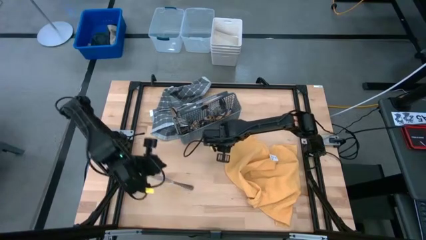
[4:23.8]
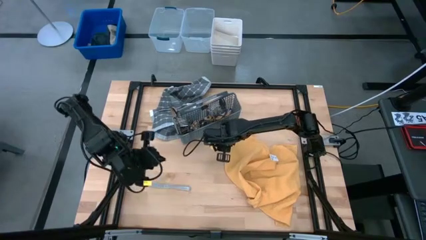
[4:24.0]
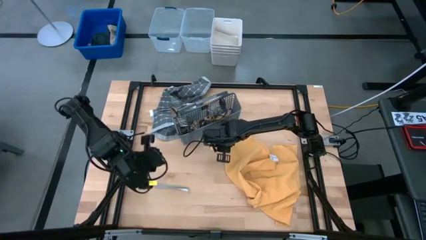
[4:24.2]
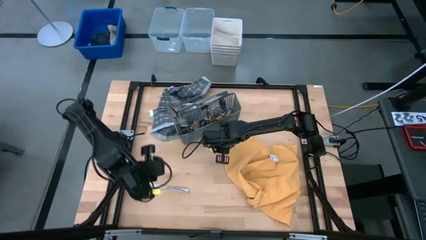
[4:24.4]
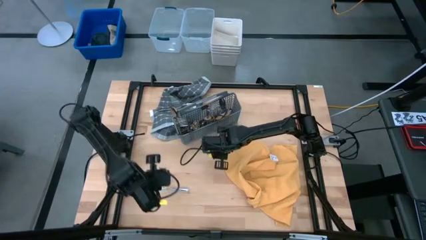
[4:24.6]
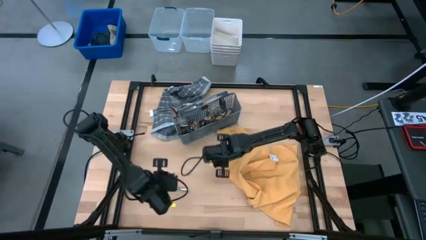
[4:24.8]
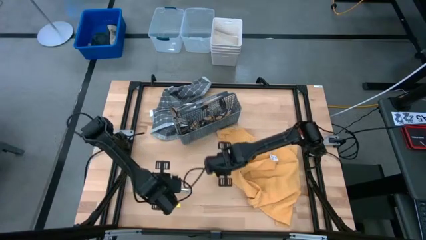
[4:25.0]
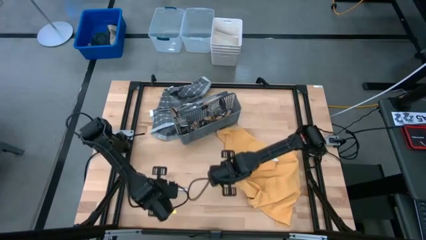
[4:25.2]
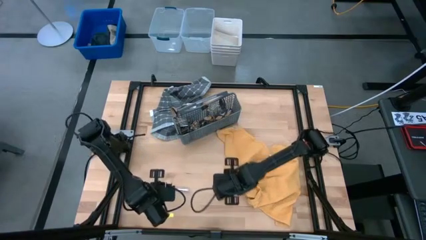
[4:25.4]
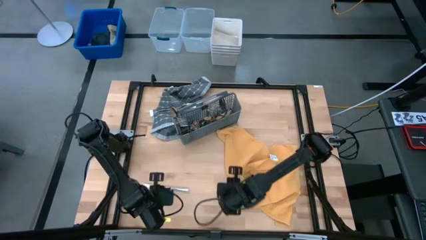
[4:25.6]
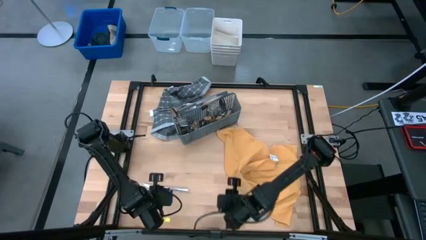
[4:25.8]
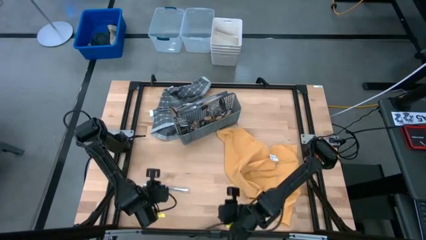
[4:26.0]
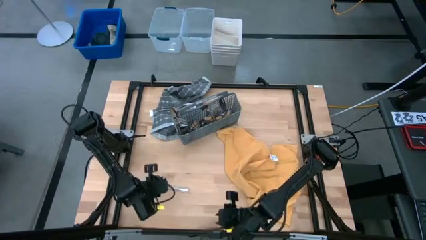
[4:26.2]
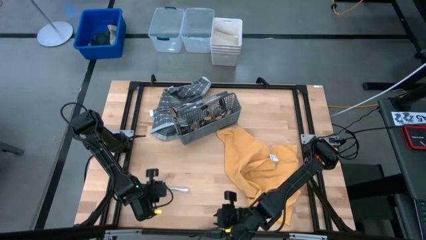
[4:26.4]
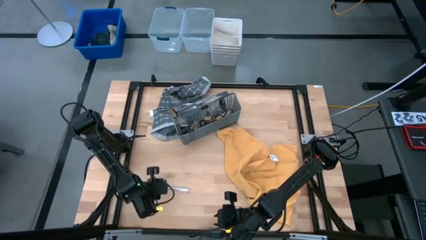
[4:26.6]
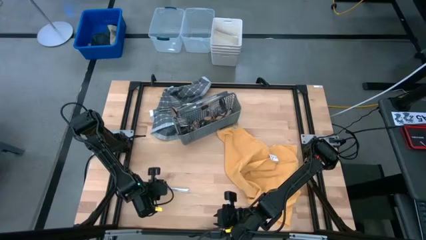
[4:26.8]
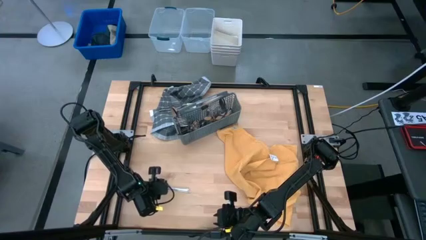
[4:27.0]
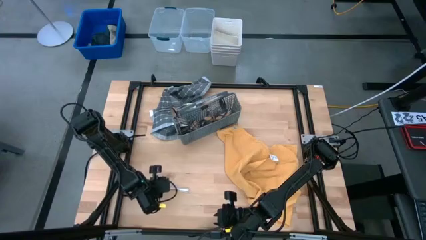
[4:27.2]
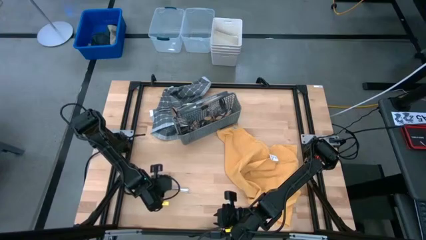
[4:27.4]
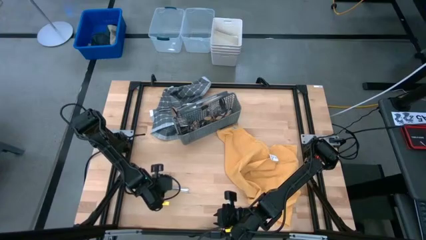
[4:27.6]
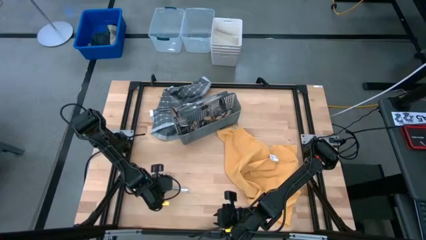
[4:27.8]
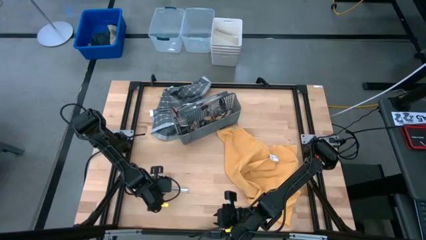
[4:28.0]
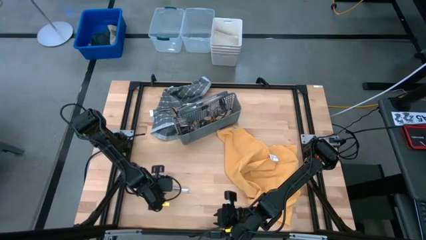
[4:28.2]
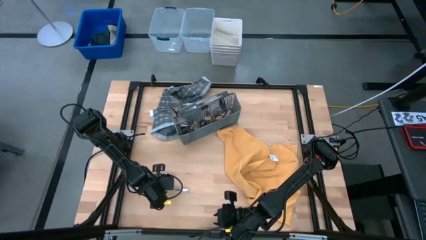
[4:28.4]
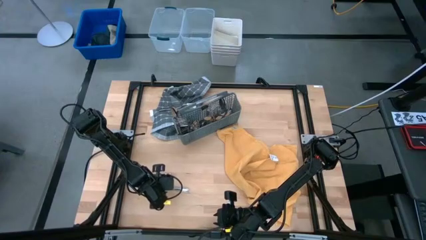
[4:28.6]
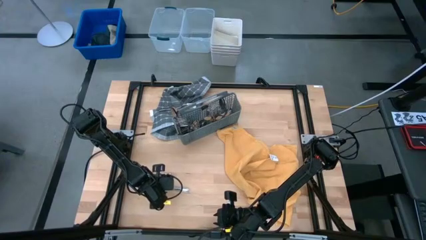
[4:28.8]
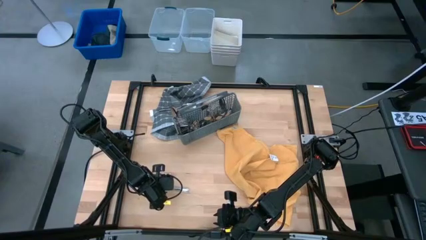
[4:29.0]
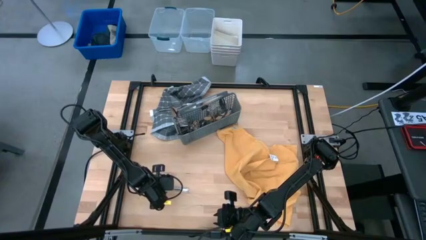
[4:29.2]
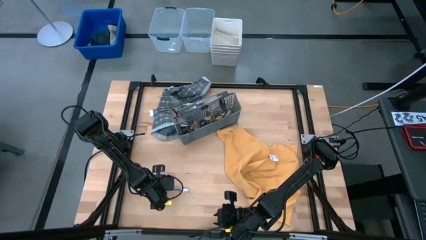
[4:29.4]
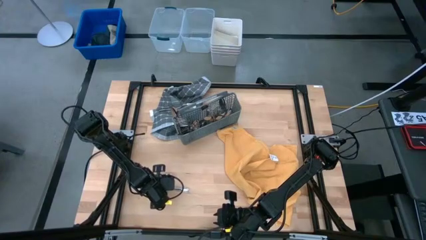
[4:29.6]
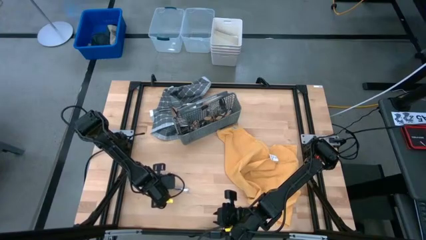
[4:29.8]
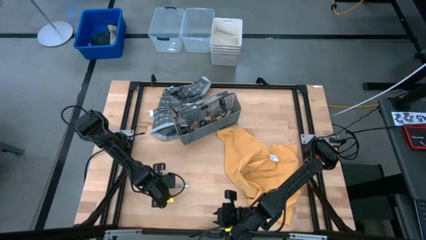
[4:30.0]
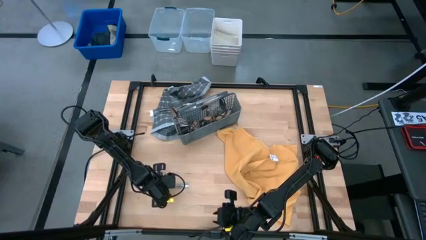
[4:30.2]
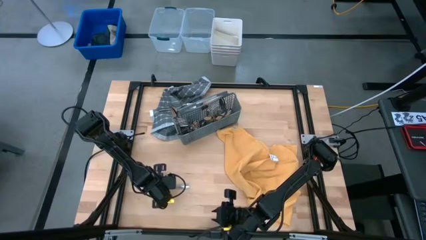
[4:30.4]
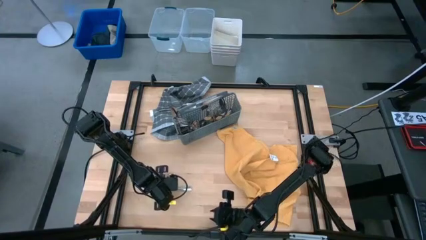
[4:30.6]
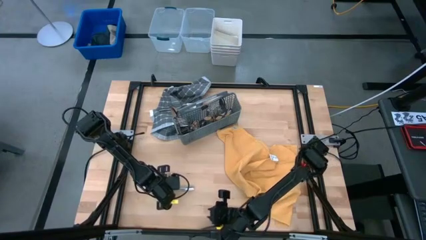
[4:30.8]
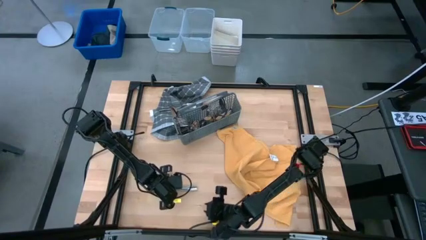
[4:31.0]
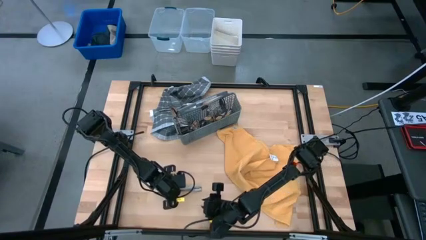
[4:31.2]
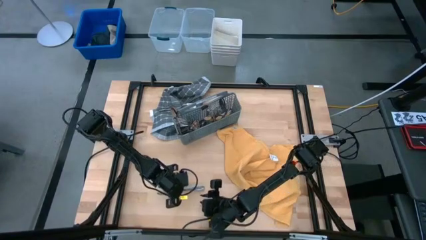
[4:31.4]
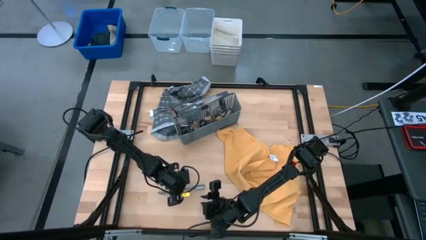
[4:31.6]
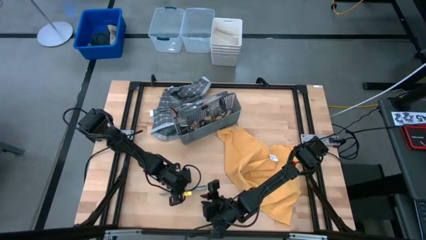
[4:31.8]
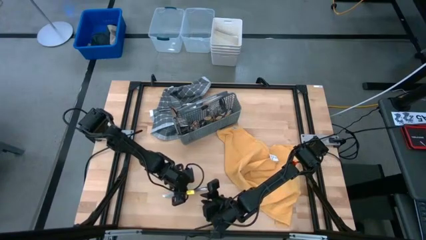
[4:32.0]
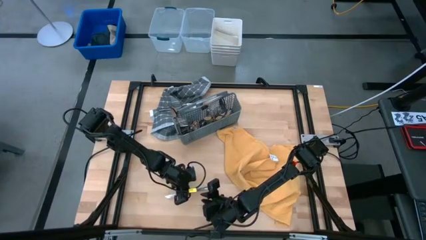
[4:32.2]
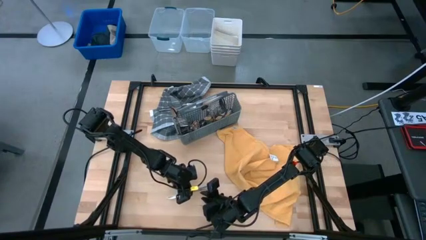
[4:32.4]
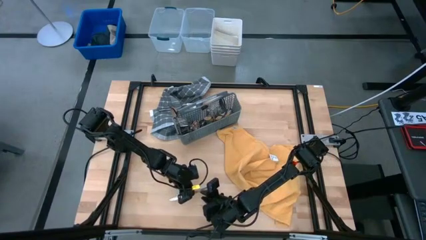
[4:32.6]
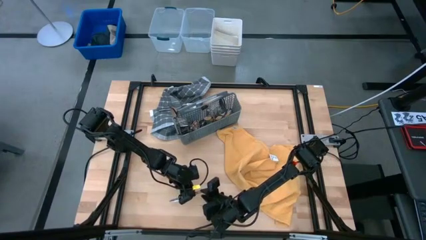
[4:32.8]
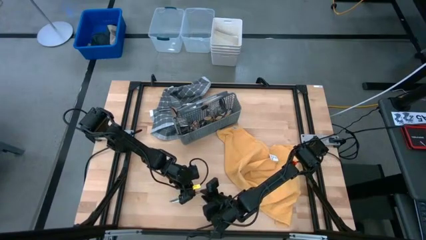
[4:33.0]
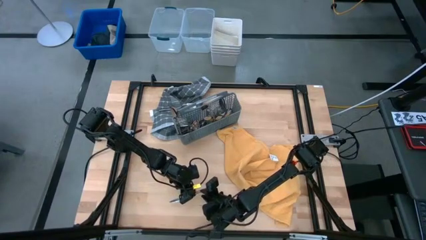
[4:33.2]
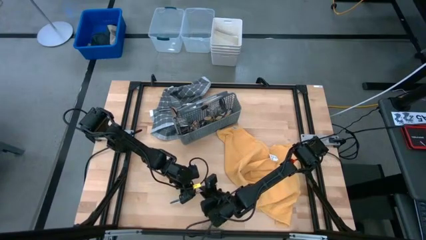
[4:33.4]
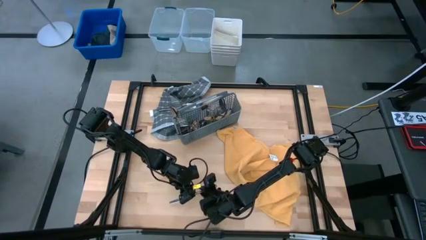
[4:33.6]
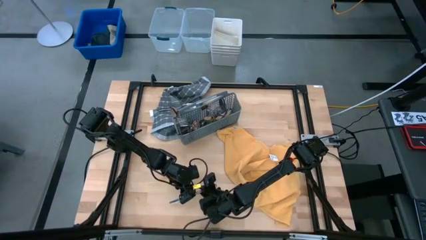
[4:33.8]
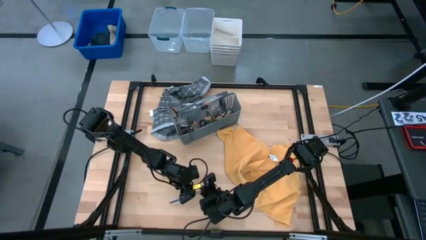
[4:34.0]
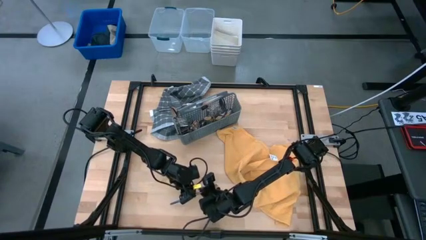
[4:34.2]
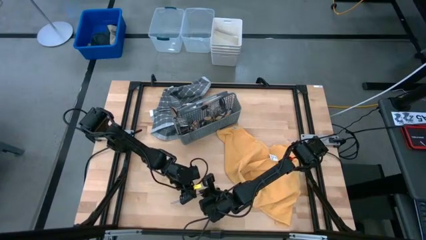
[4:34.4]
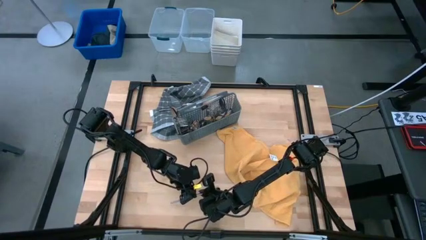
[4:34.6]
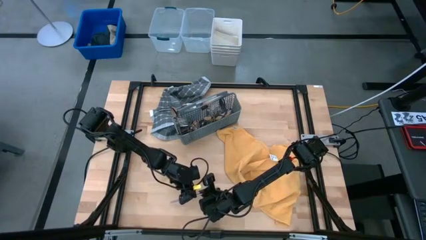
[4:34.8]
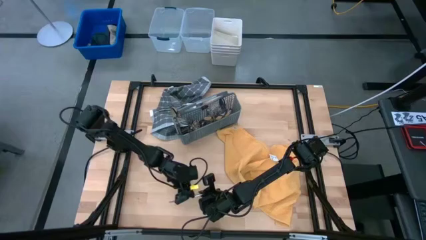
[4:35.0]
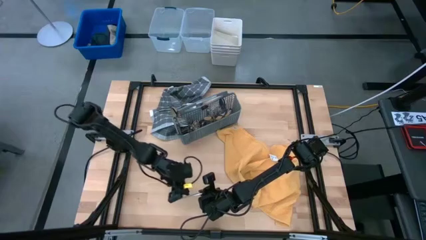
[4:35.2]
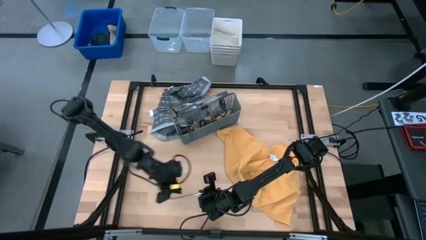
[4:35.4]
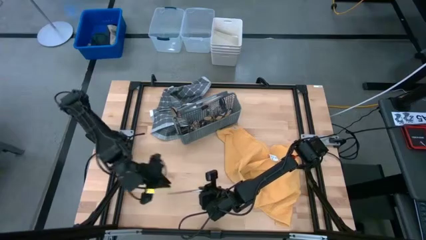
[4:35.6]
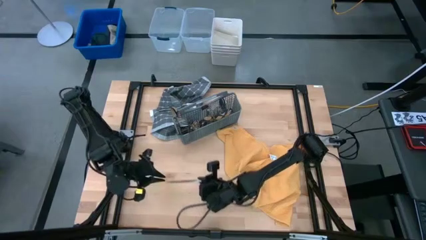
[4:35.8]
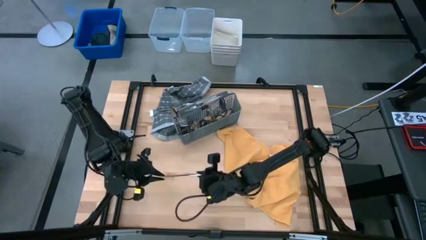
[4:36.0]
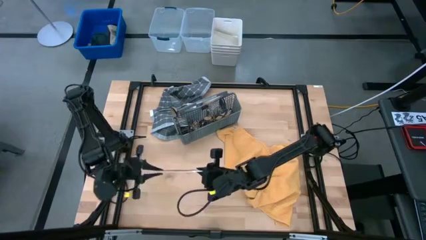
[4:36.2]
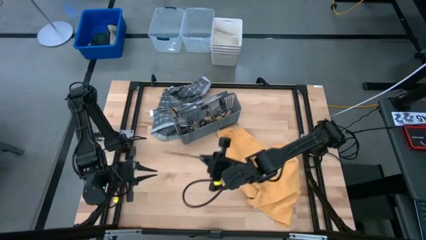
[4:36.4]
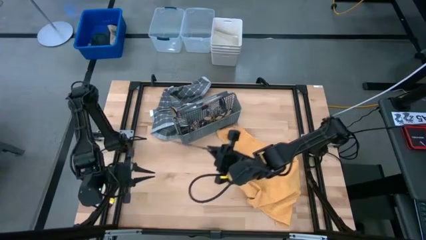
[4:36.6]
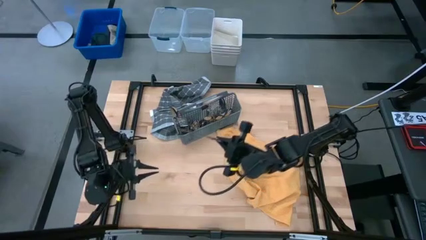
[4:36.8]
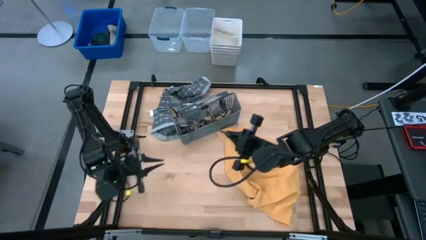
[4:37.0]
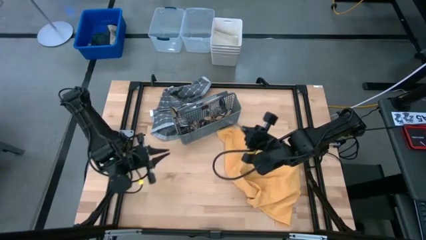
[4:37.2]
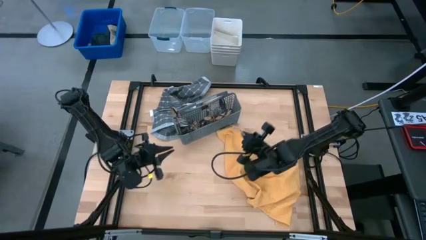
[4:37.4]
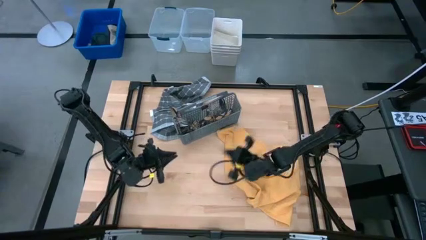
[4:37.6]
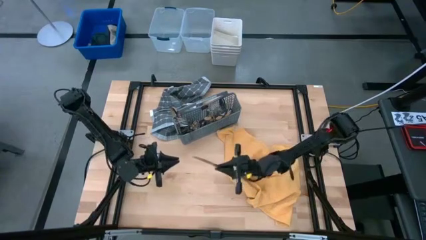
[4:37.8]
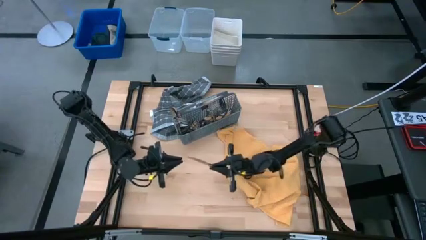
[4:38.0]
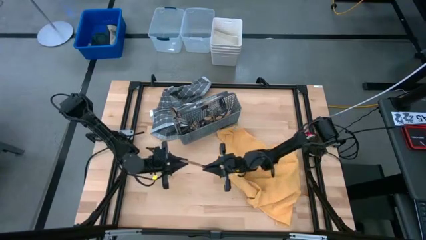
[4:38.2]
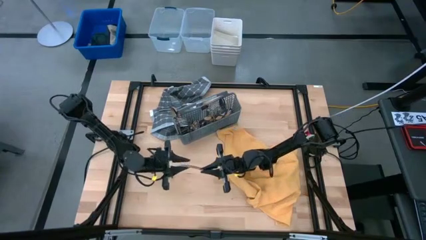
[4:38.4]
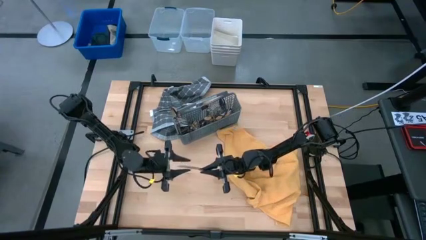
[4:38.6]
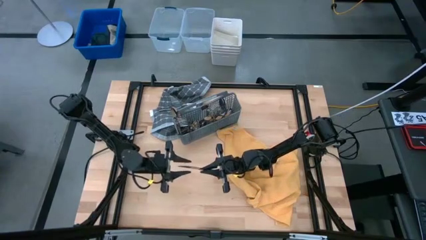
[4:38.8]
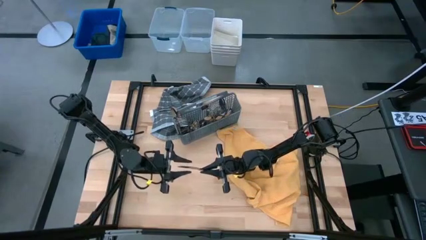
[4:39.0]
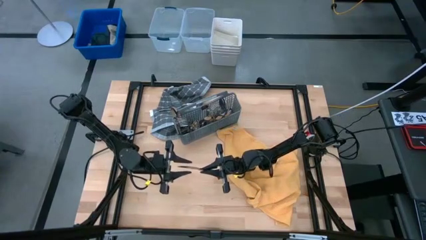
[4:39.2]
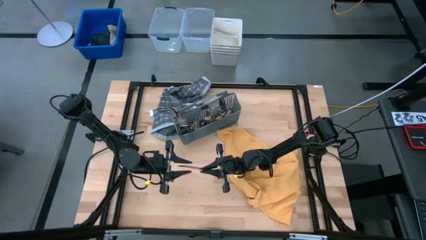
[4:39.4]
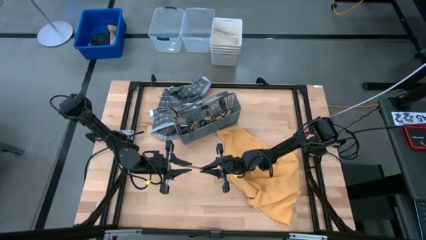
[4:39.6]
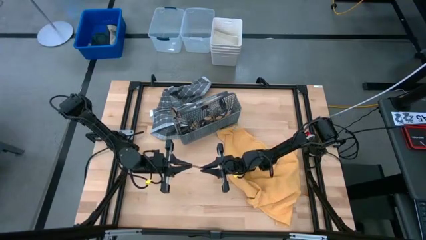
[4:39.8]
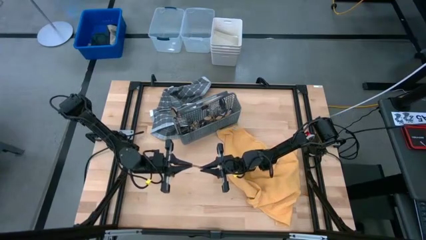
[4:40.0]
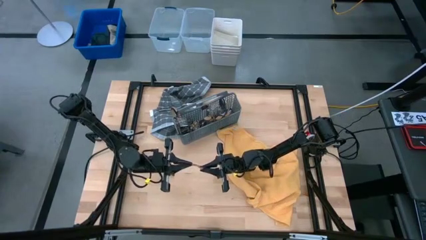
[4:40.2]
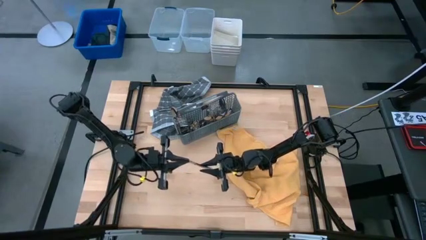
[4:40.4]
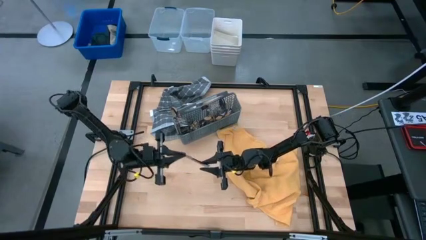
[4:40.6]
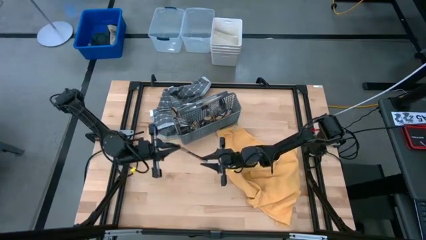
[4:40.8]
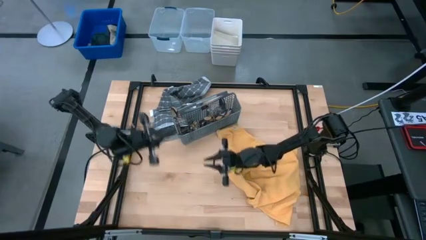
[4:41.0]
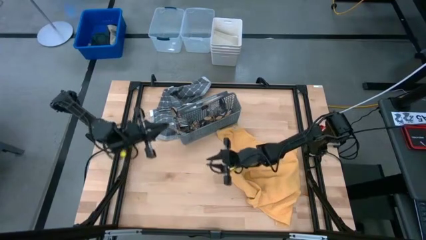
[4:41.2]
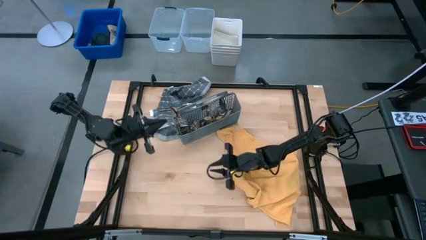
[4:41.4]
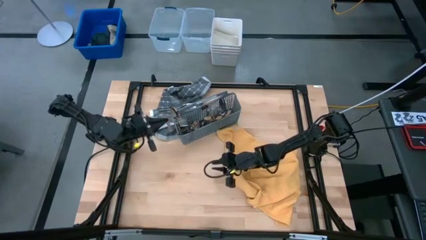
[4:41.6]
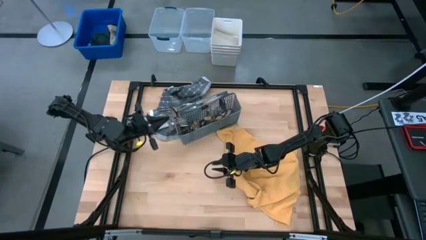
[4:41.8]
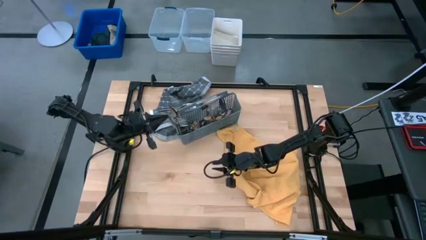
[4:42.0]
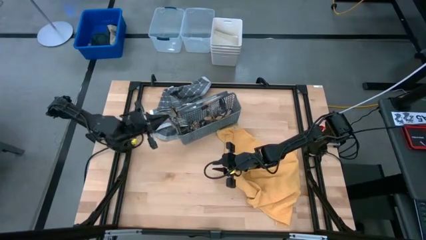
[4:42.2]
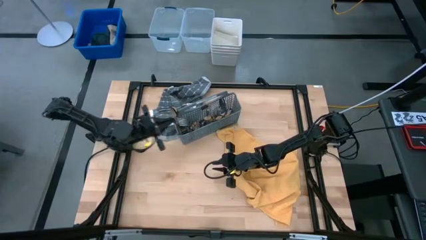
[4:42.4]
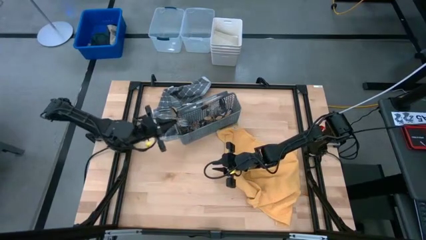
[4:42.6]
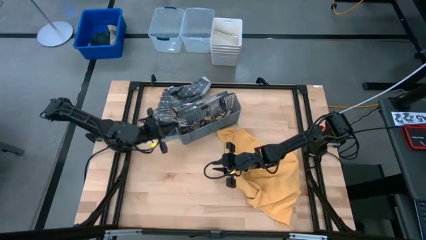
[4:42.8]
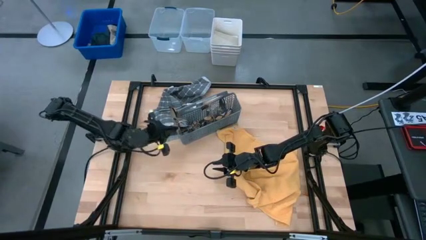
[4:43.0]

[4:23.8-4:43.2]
Task: Sort silverware
Put the silver knife into the gray silverware basket
